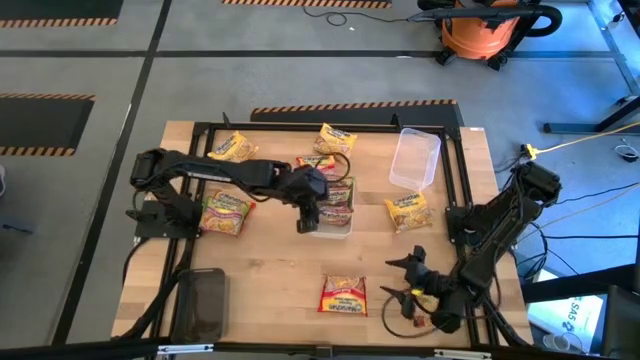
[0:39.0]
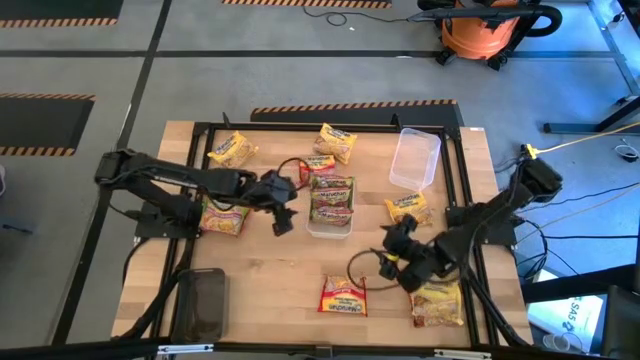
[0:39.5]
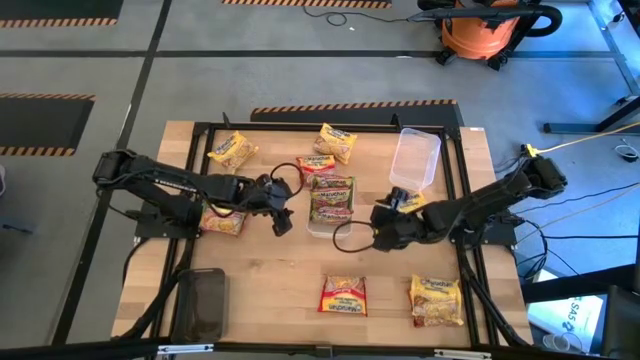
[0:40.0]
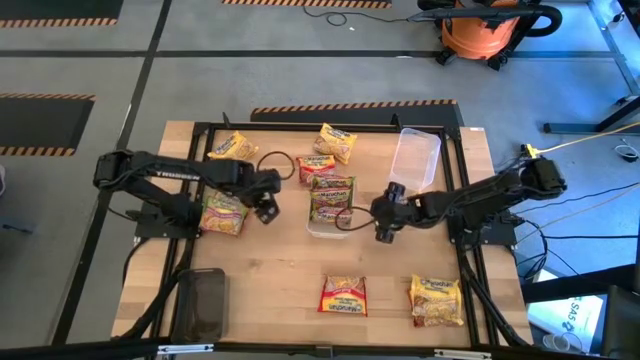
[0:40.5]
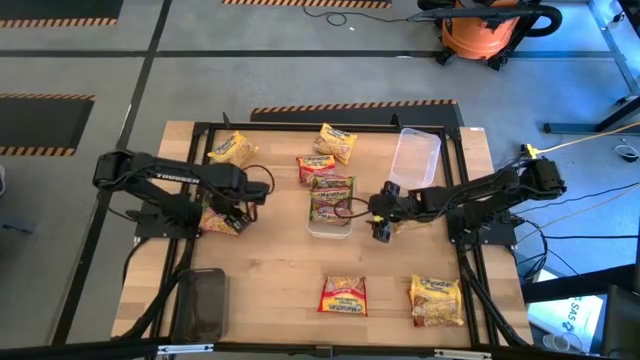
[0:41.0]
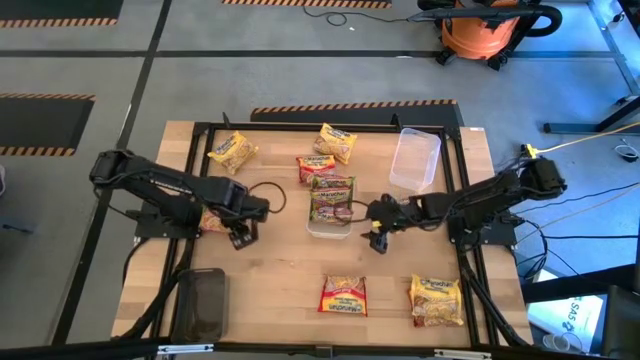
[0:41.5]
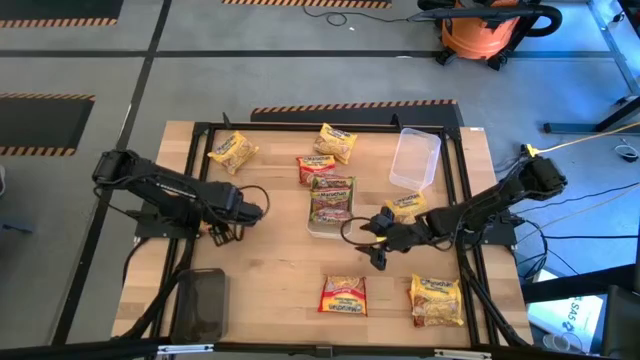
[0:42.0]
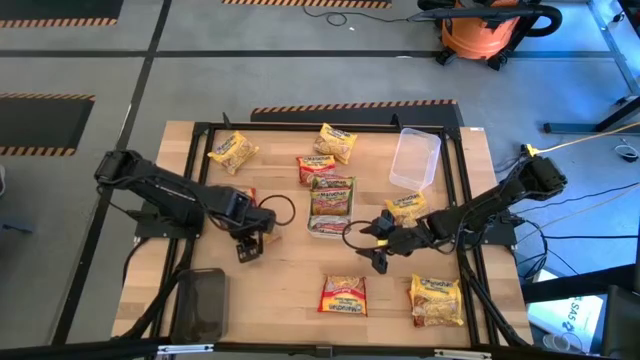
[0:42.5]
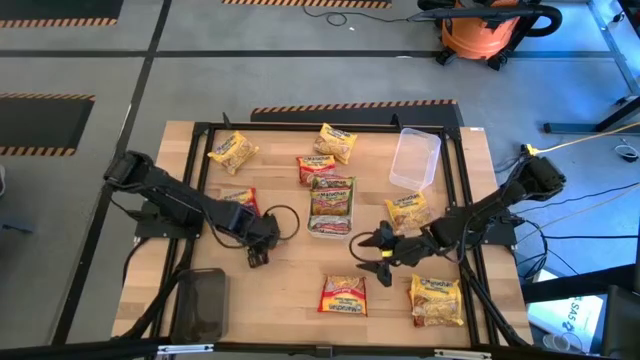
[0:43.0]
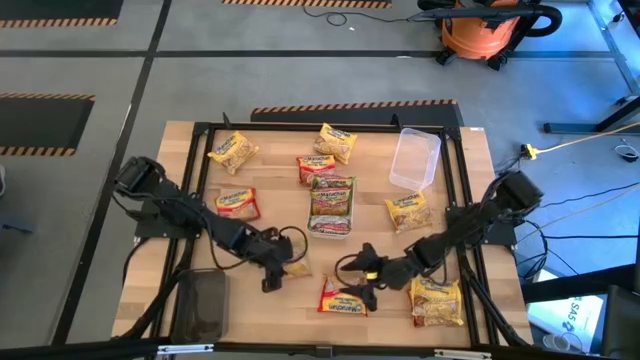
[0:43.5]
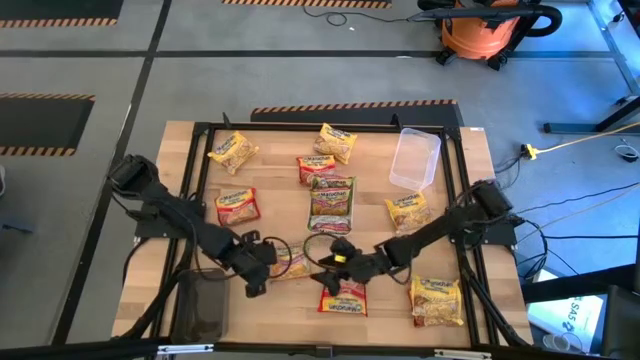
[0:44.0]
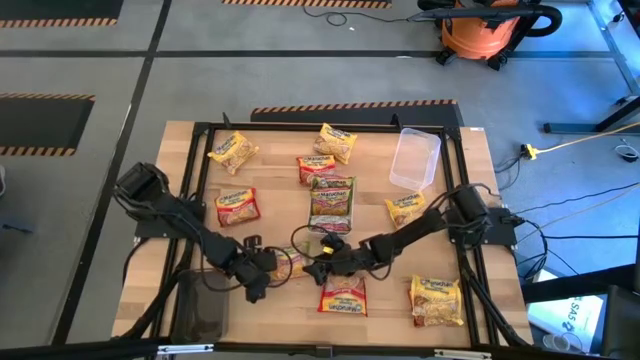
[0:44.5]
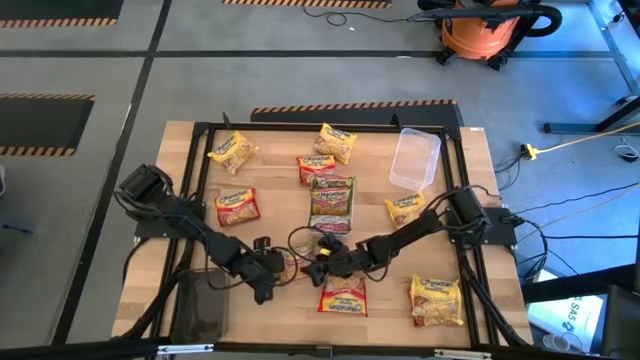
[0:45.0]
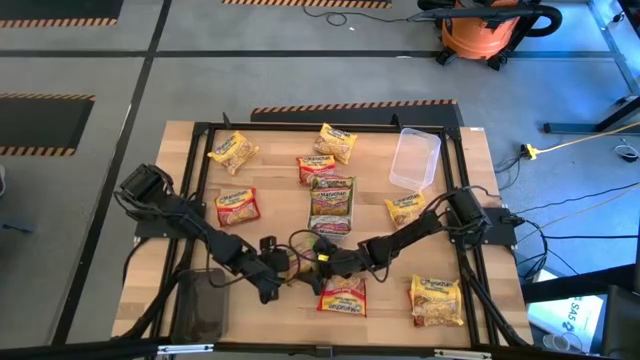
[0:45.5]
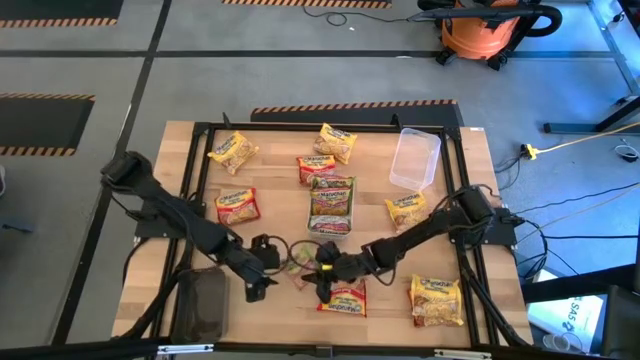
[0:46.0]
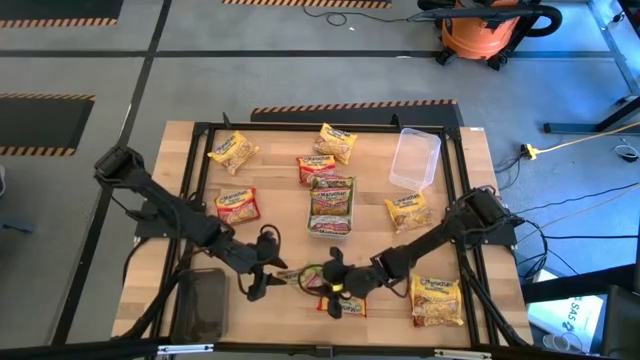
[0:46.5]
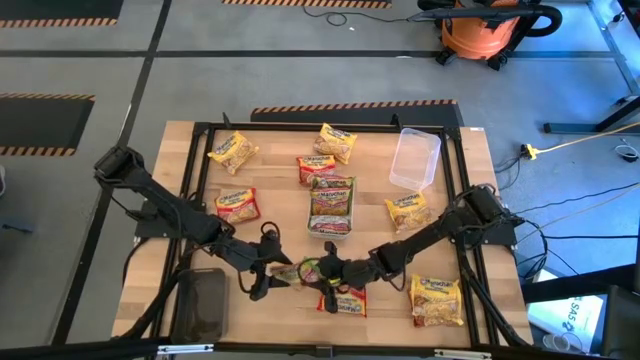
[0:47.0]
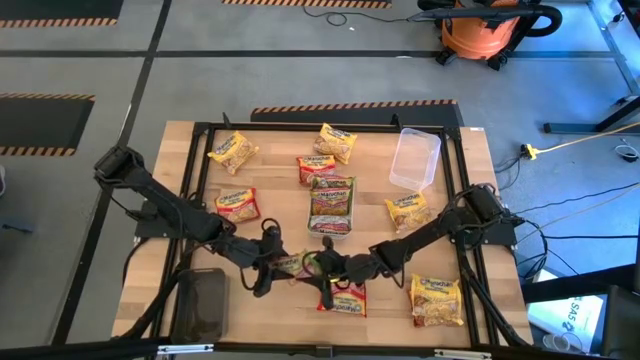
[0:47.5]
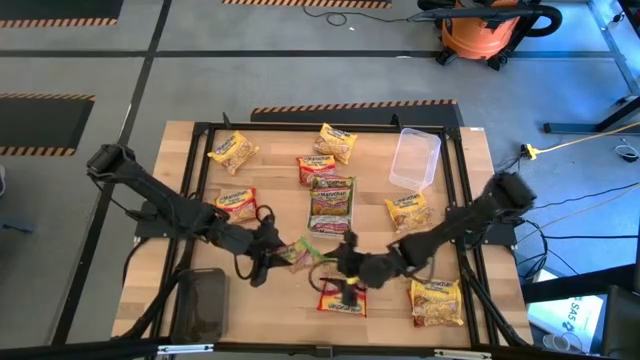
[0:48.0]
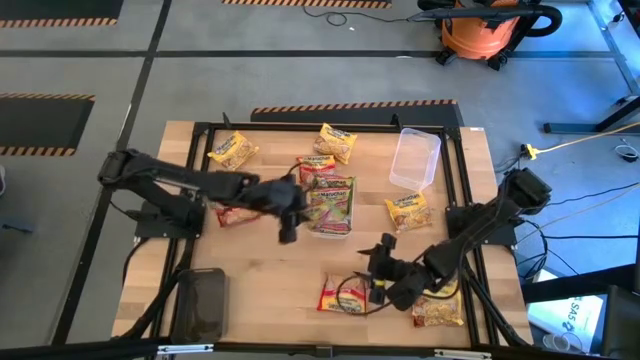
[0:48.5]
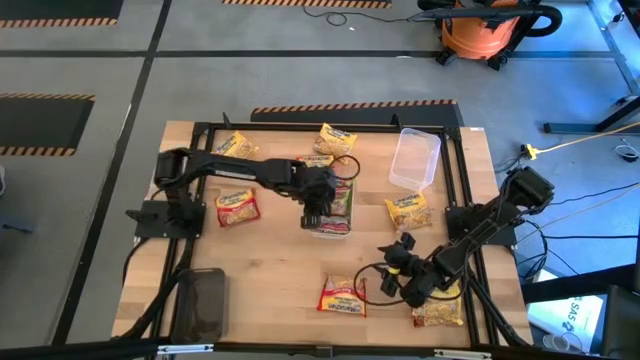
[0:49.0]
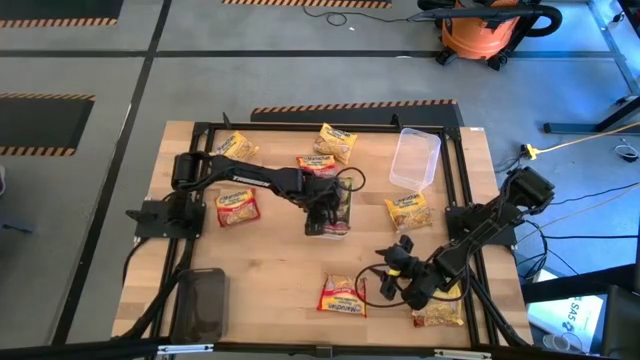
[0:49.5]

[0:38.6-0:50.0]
Task: Sort Maruchan noodles
Put the green noodle pack into the white bin

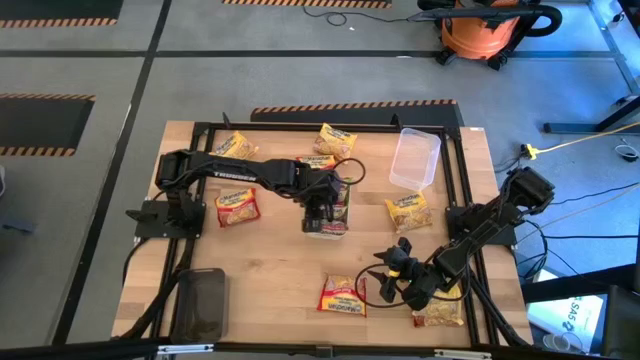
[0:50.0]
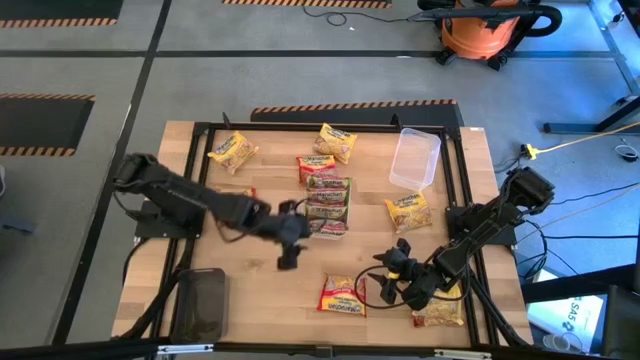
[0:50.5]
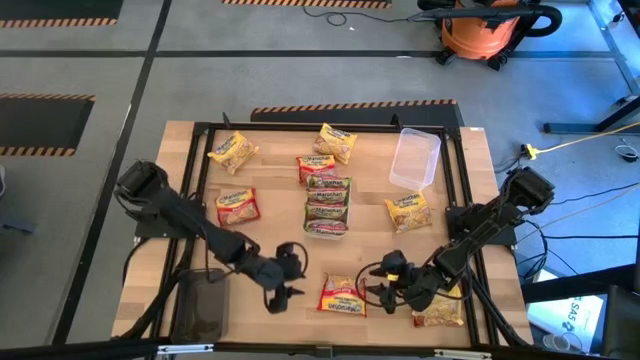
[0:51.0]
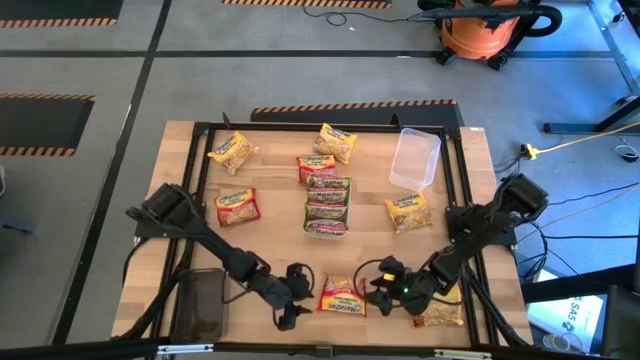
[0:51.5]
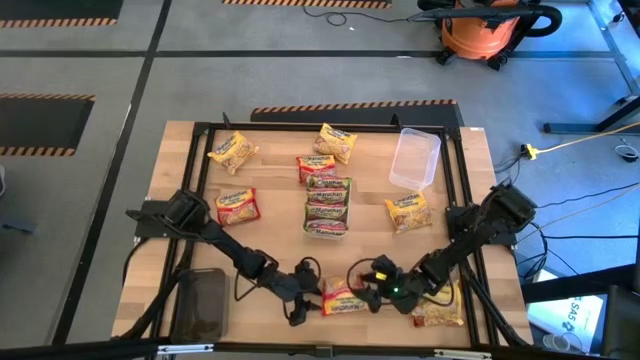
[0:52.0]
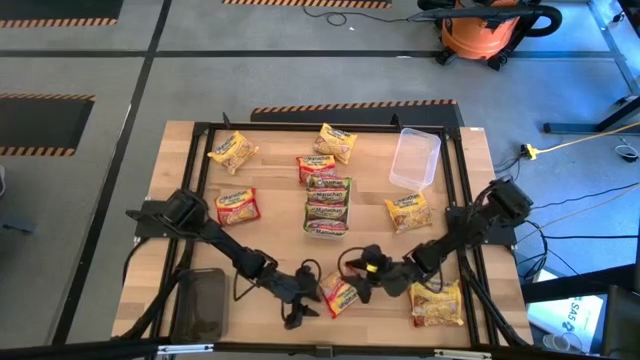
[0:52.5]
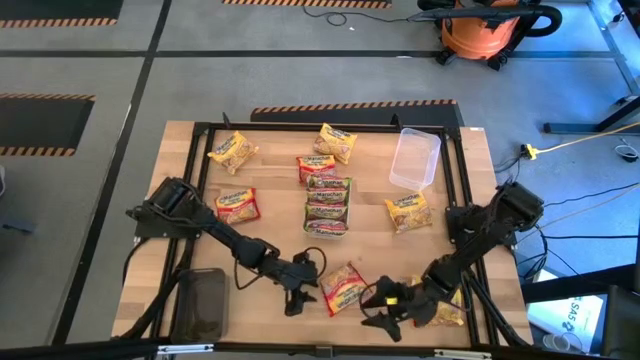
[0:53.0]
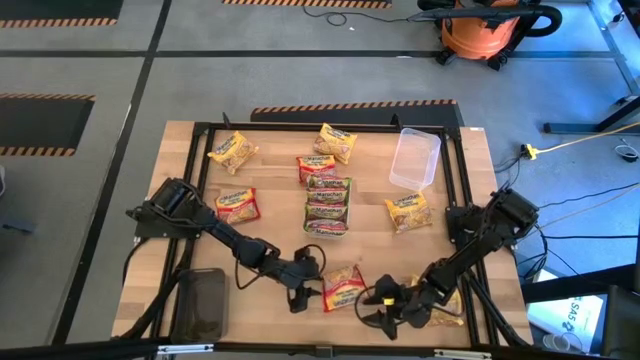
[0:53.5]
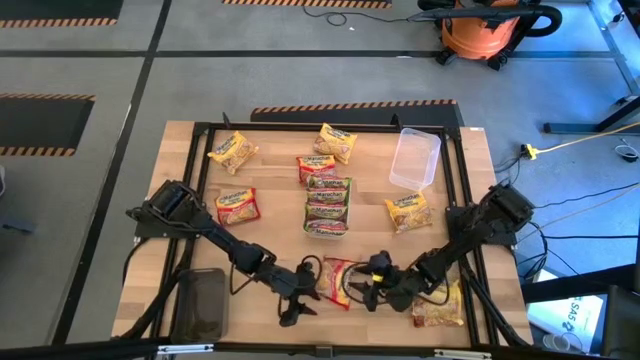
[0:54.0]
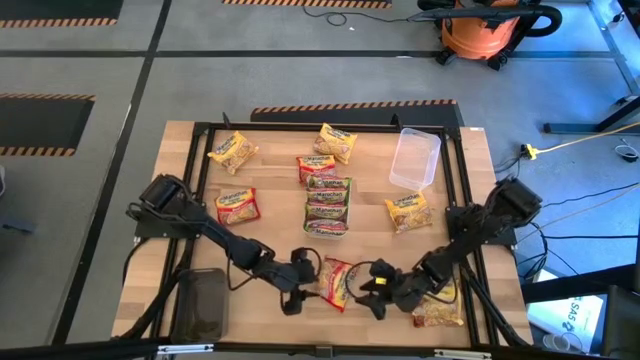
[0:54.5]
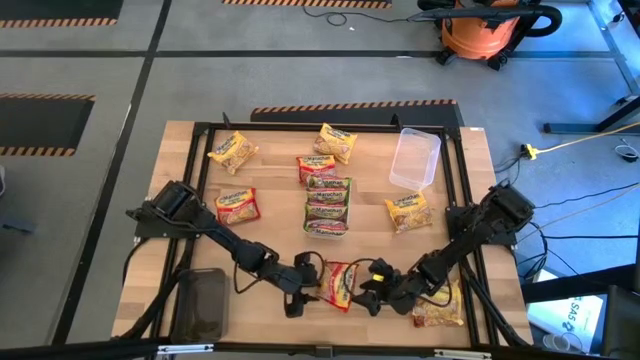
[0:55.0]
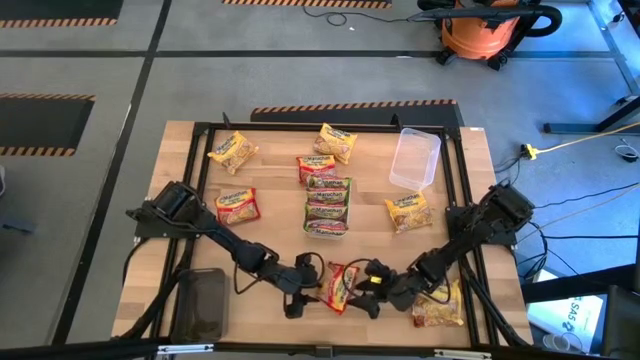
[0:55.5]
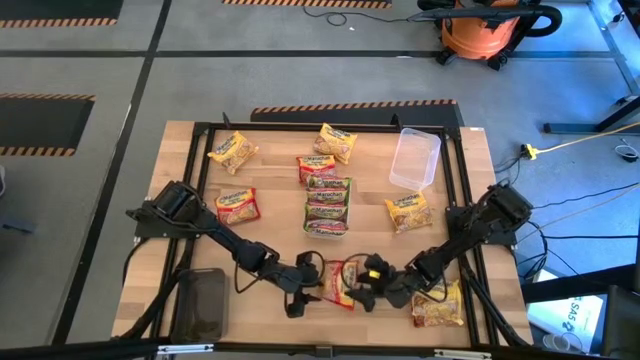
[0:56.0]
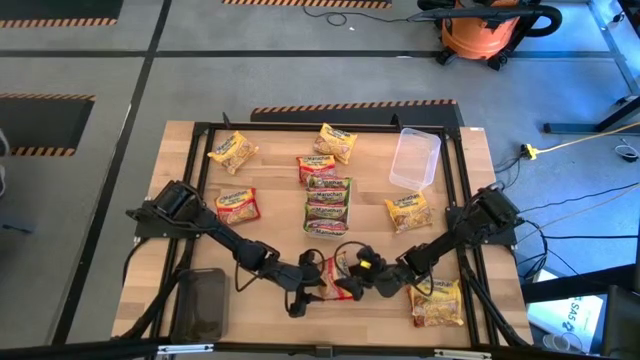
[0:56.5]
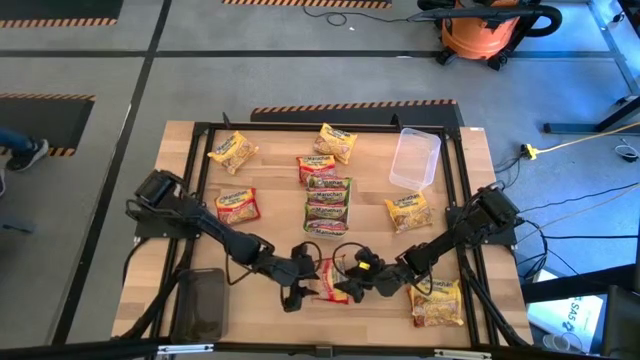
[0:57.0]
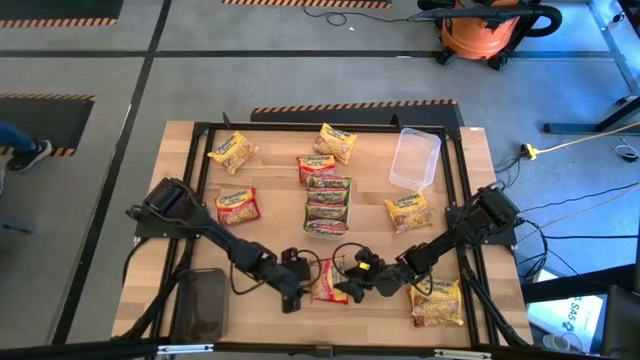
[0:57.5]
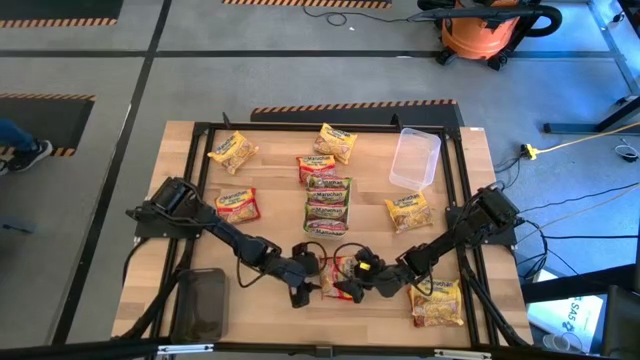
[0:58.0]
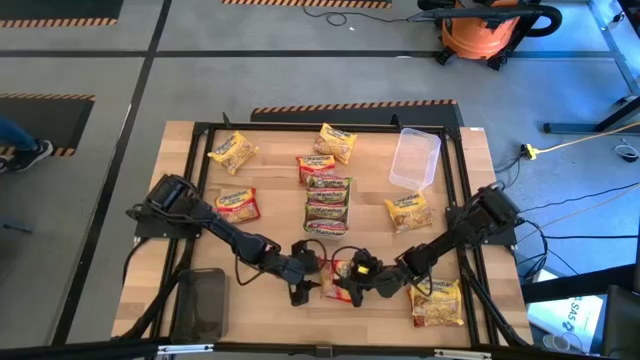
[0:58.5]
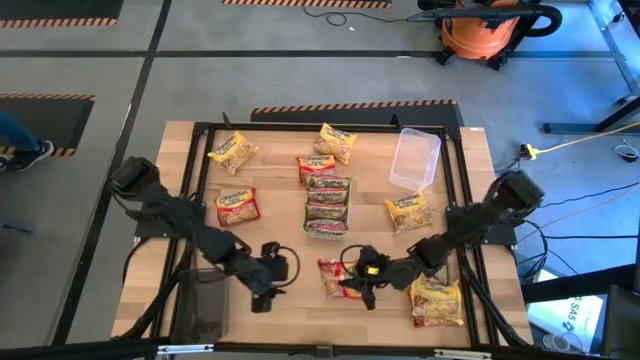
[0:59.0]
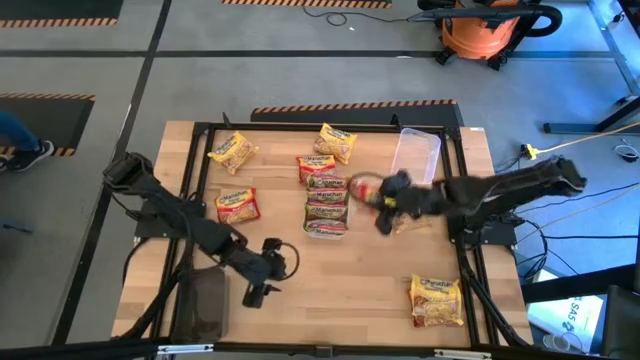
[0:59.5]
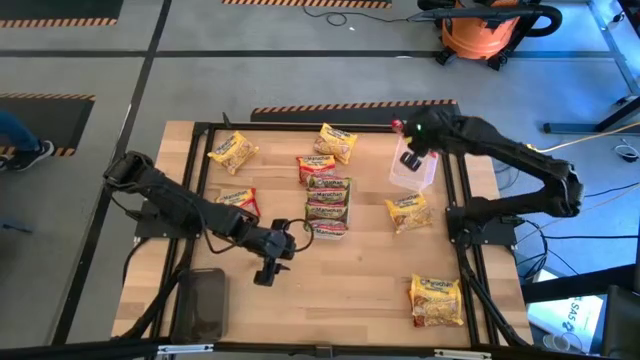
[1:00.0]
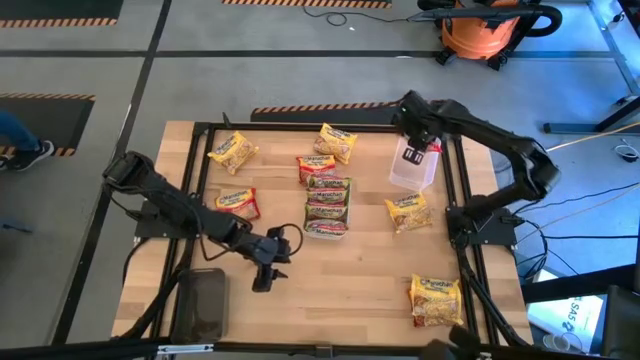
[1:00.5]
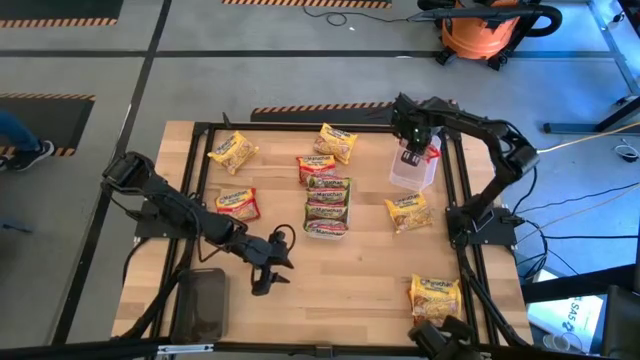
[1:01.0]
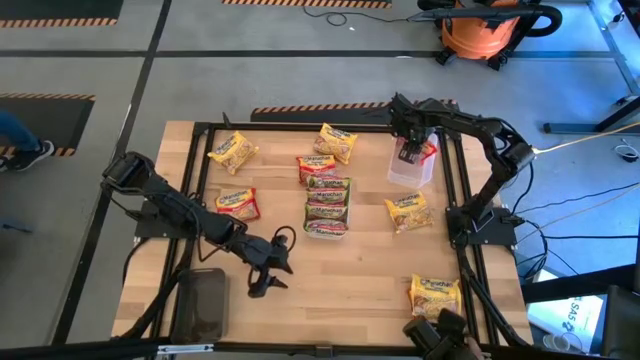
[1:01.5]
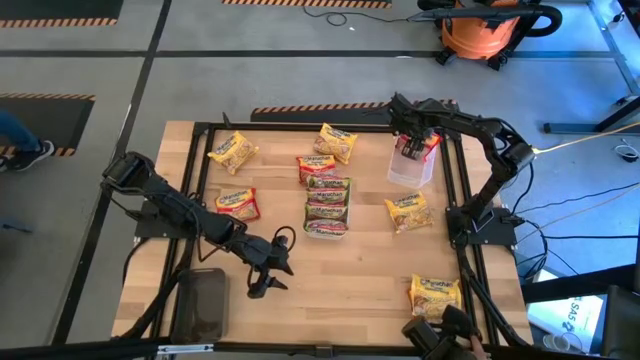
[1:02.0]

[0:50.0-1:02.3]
Put the red noodle pack into the transparent bin
